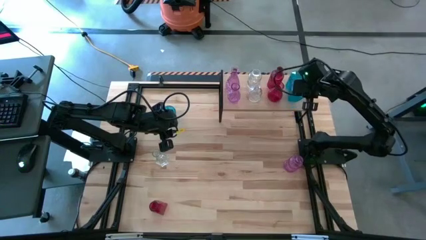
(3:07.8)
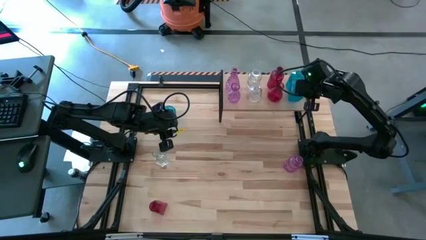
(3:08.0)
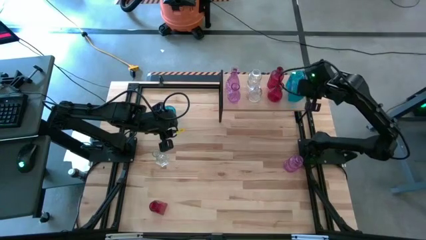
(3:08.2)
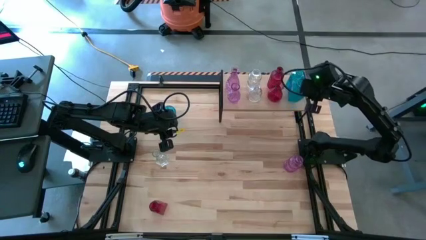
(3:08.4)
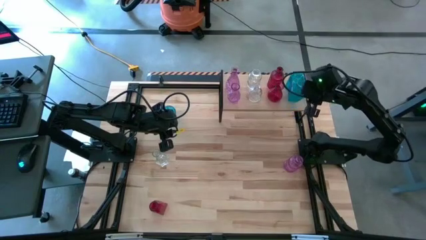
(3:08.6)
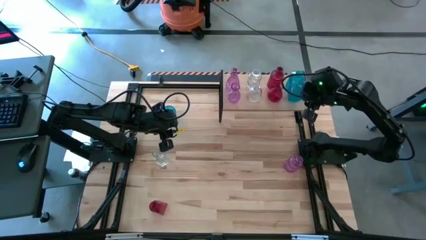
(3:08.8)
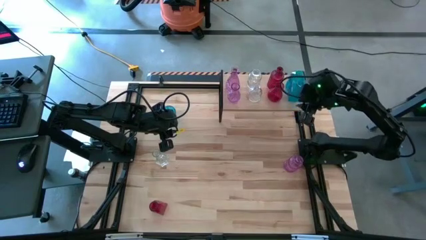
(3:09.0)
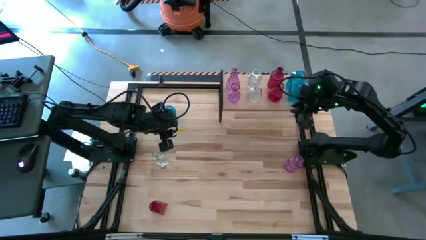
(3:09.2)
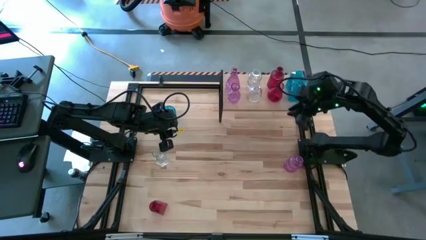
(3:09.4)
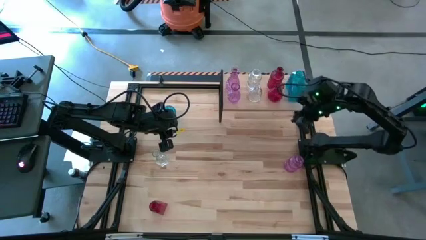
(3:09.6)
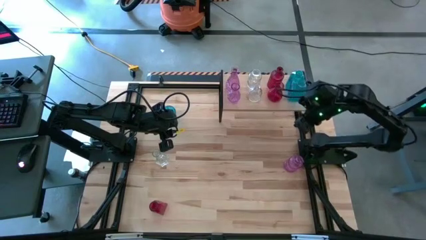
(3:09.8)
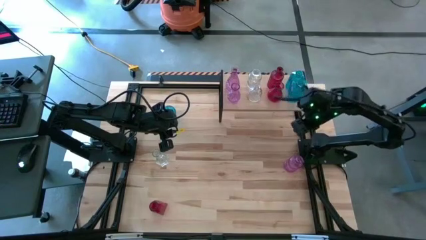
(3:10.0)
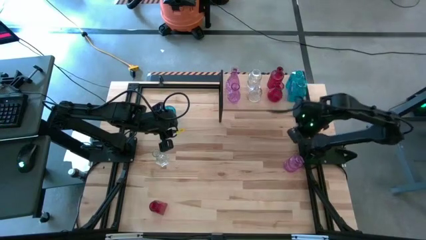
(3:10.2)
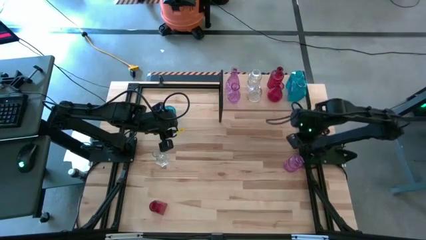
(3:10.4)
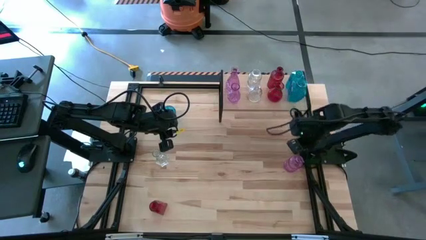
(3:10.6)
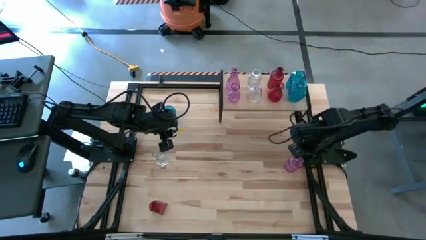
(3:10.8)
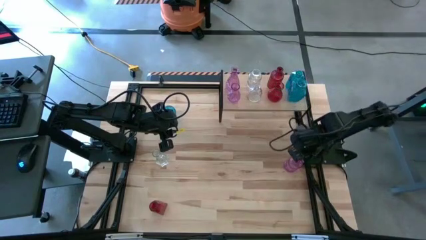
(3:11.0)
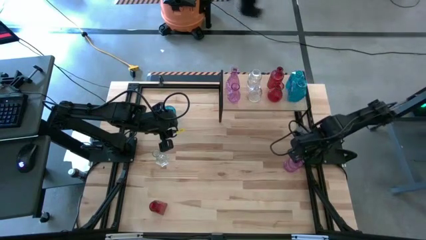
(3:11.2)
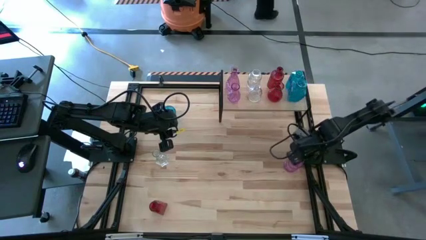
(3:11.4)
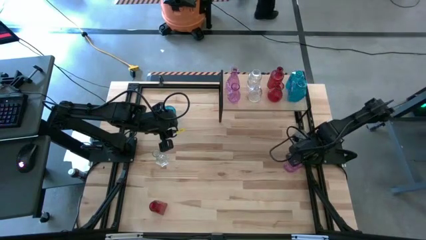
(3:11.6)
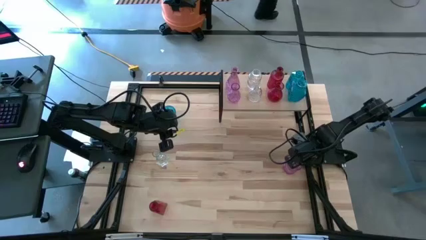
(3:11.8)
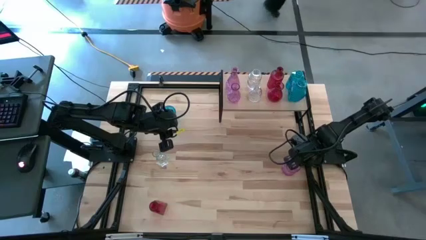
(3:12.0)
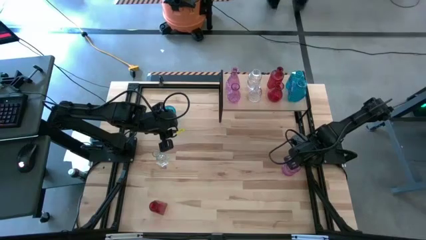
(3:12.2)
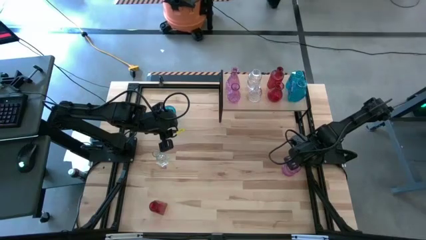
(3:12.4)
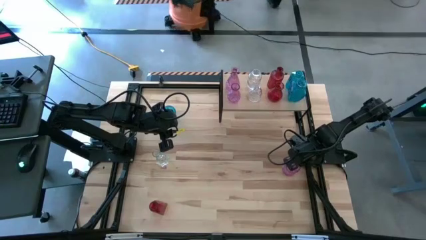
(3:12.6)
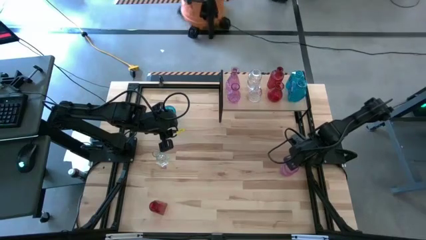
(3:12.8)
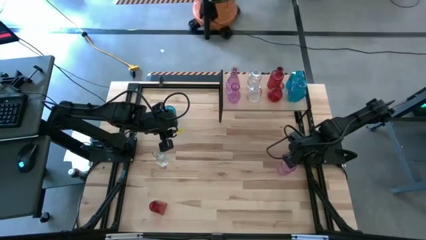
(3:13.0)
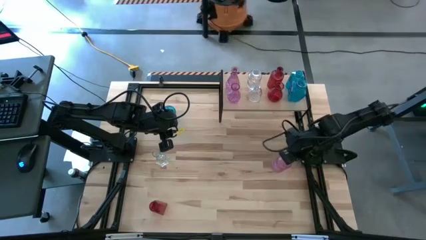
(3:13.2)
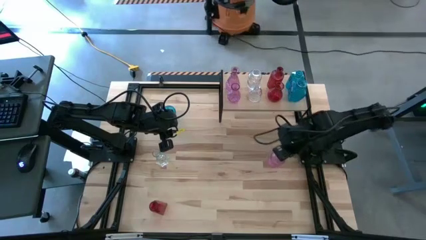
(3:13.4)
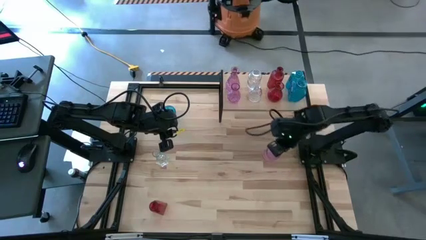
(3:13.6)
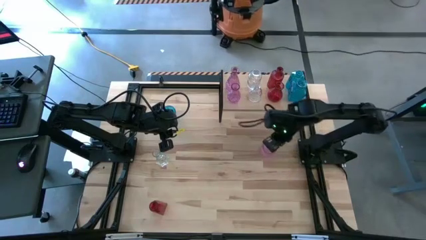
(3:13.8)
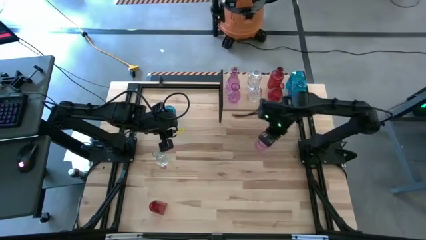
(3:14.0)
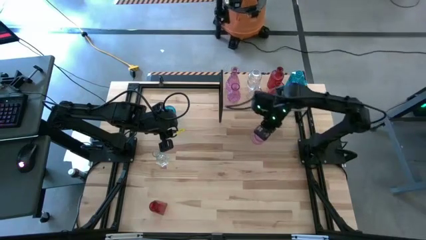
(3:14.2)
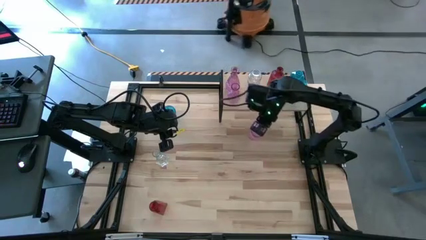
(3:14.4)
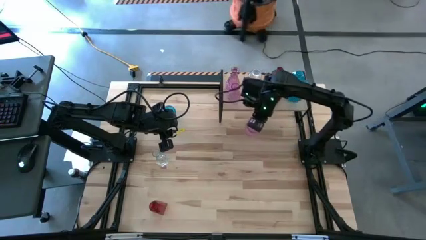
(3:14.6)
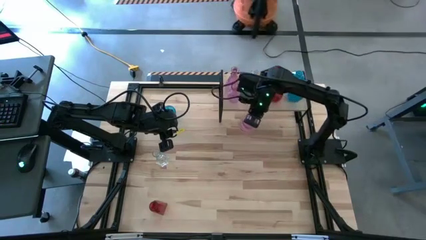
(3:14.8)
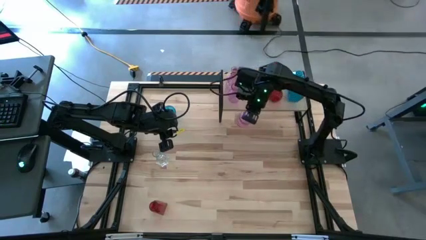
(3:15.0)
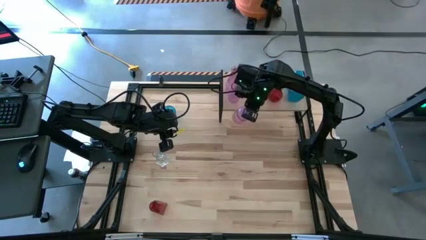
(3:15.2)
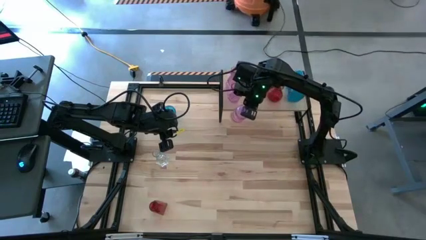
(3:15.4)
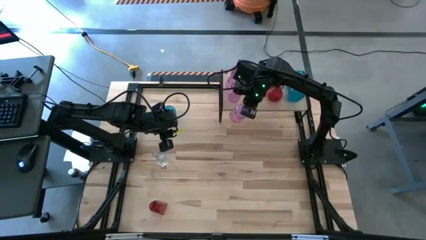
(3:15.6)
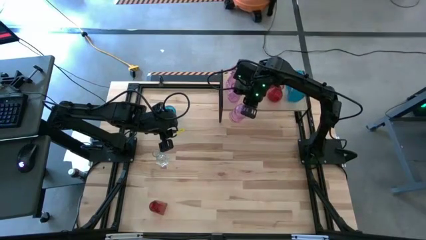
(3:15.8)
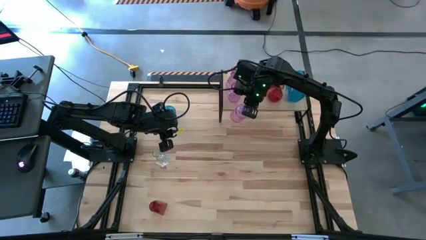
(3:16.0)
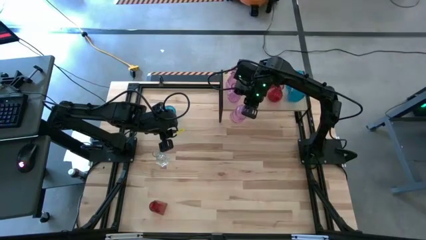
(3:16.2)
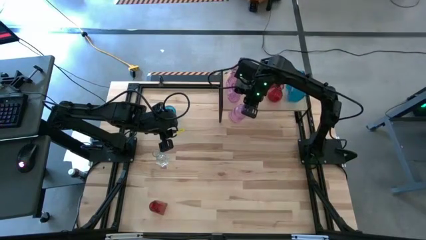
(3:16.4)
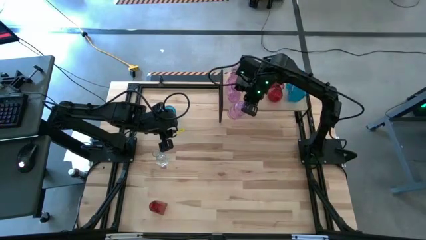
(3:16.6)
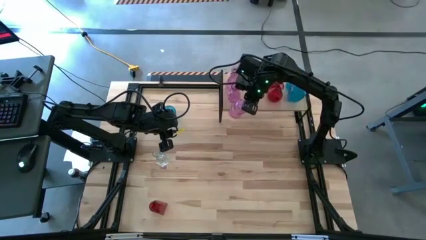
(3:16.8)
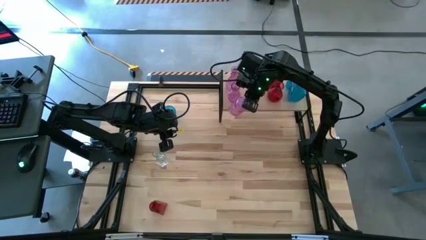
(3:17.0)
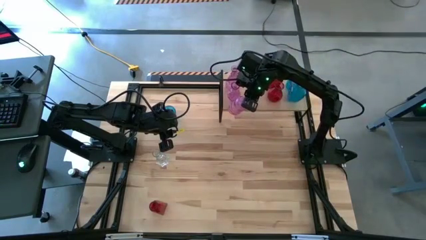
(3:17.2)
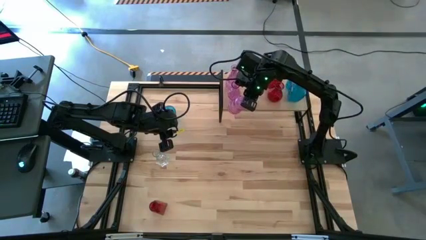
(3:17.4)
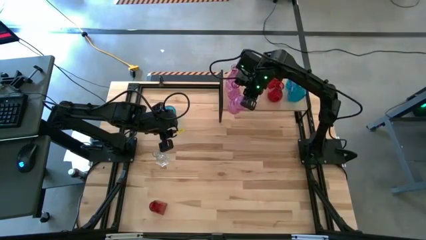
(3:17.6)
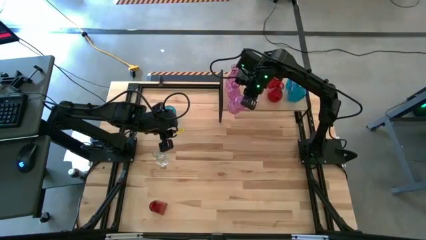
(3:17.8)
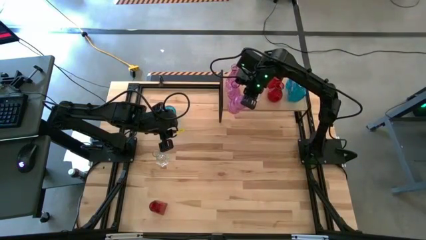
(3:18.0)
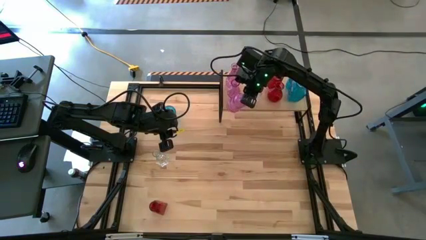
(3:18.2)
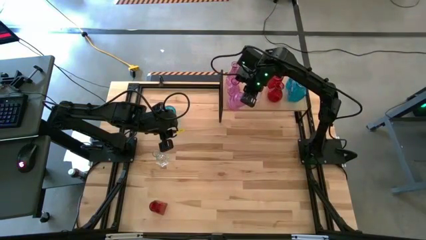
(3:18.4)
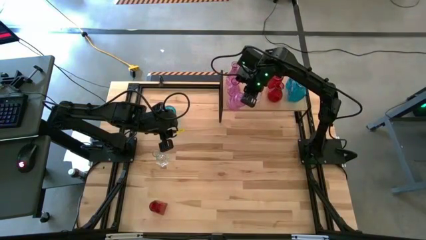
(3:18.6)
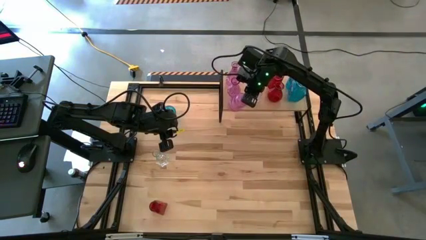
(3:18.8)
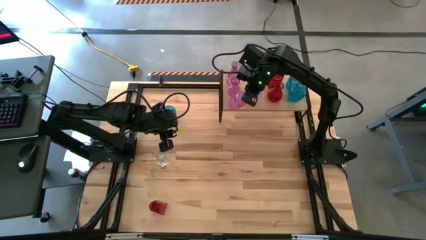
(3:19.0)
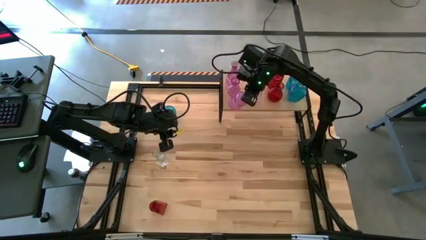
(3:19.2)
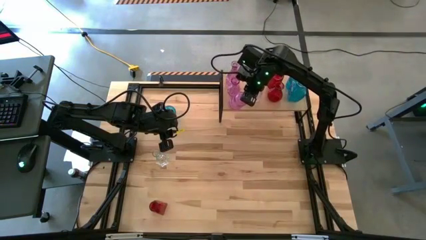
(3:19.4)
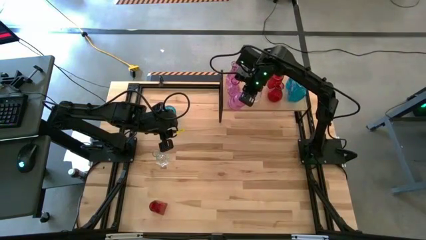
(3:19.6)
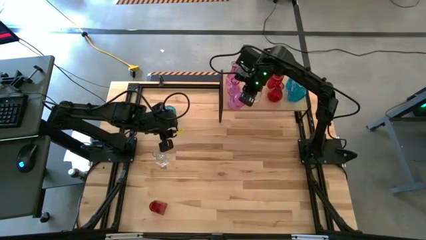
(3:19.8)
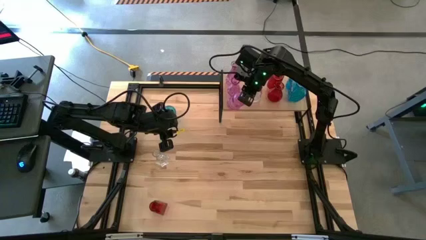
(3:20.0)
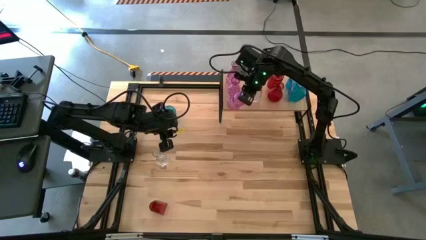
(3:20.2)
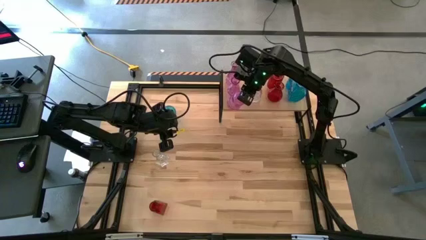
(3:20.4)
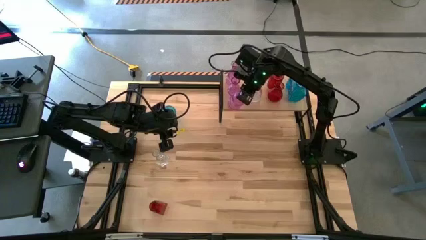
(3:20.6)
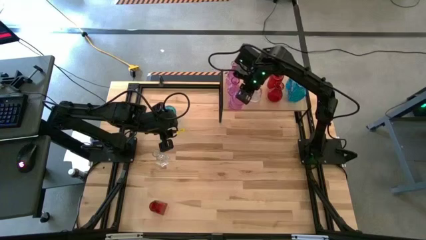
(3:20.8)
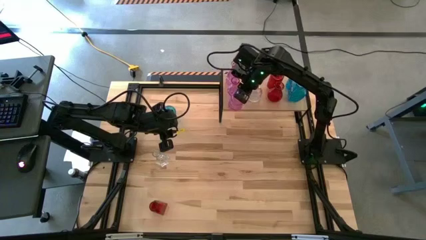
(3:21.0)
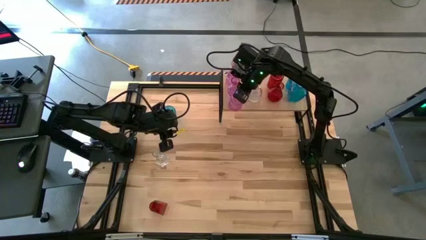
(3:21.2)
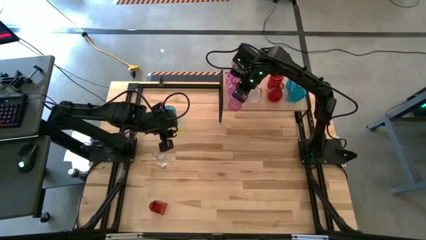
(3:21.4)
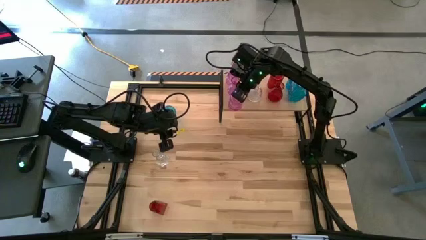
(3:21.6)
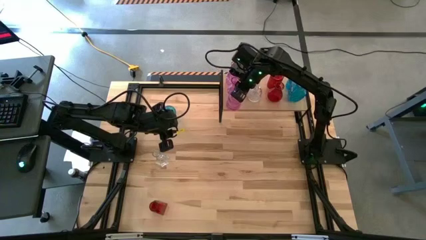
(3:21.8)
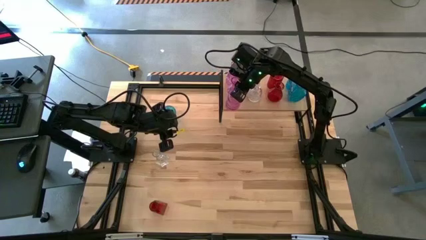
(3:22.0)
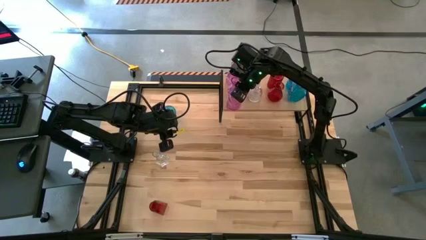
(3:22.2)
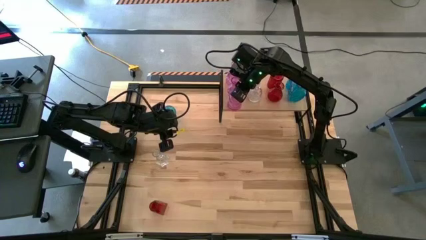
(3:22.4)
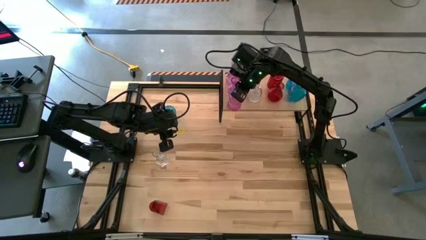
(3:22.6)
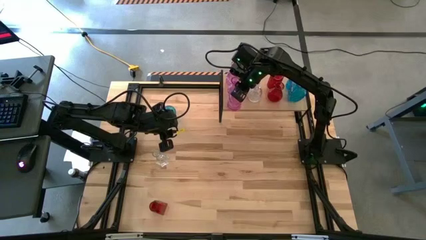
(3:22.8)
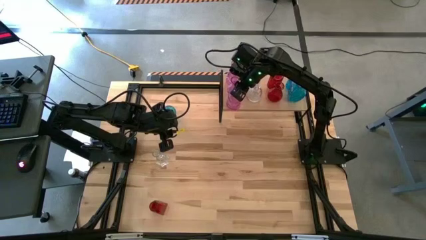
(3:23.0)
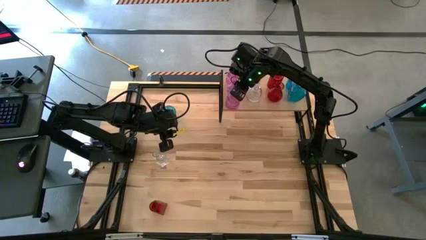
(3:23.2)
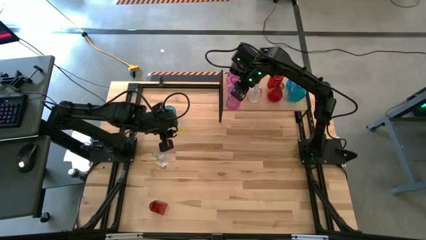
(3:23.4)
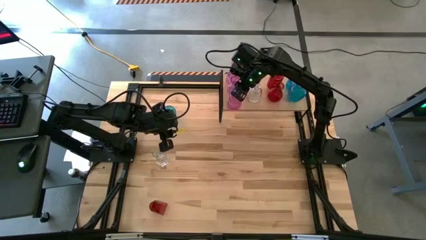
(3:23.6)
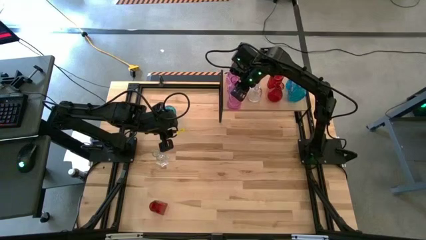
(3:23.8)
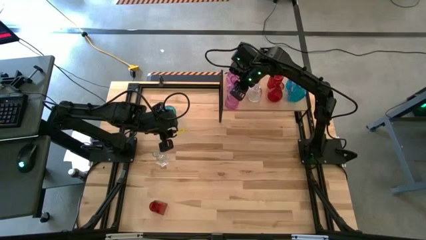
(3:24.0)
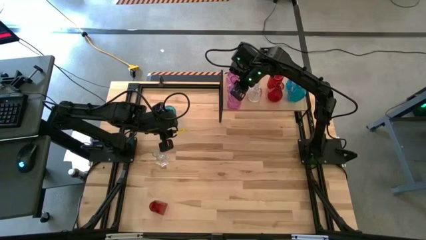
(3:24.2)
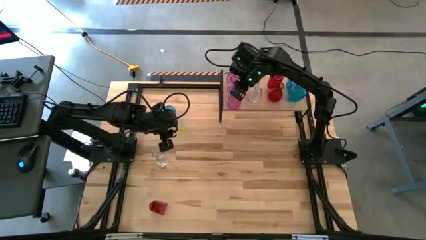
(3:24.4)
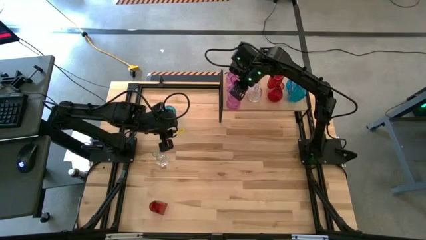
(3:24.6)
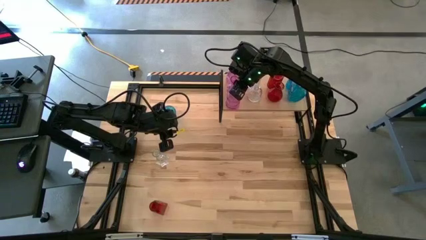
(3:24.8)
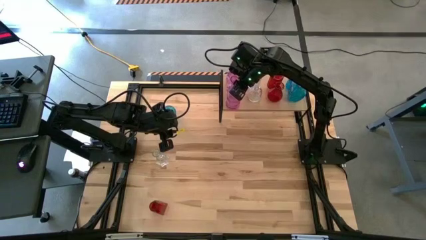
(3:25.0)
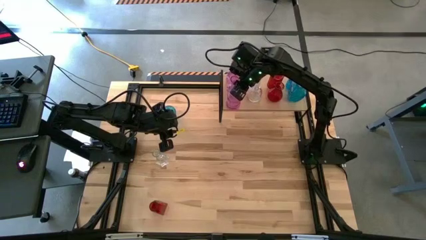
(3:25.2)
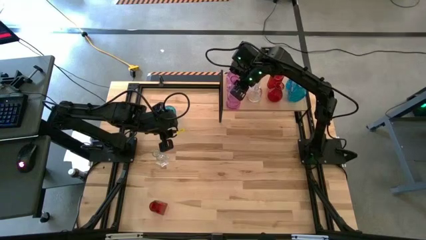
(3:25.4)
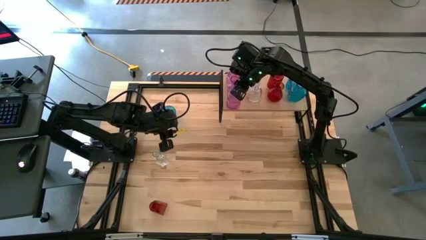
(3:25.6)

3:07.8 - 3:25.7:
Task: sort vases onto shelf
Put the pink vase on the shelf aligned with the other pink vase
